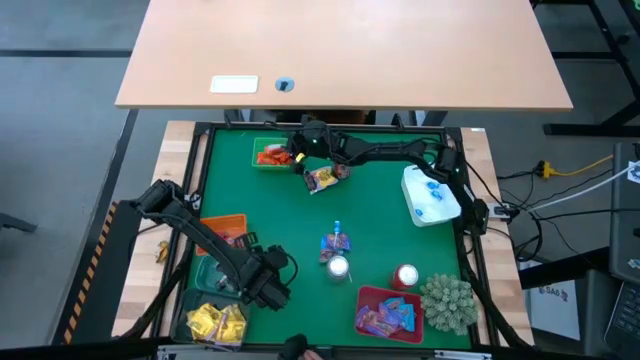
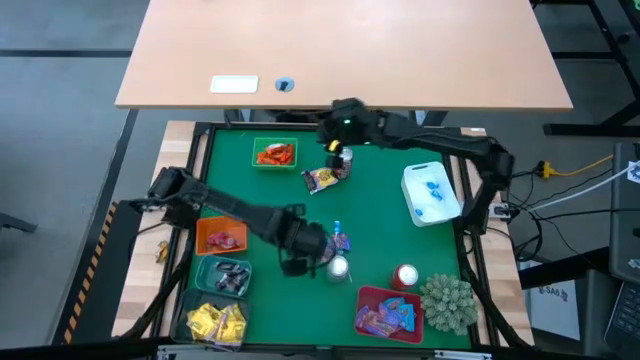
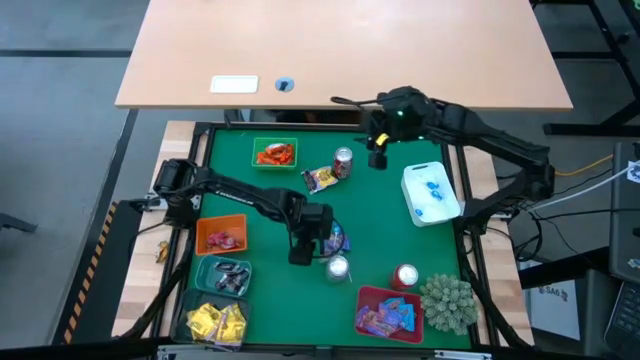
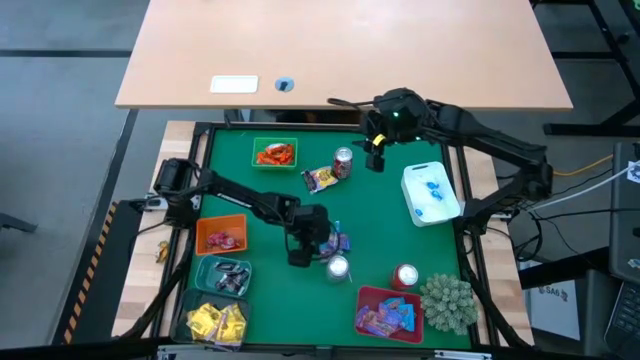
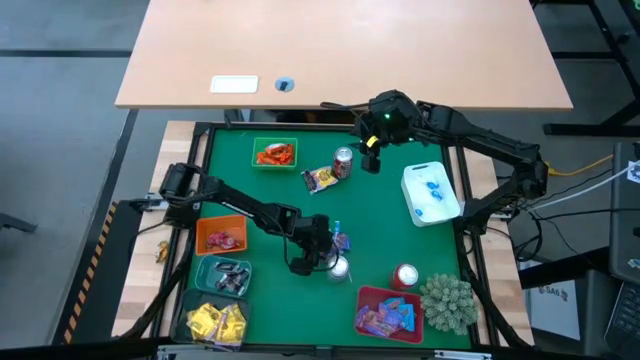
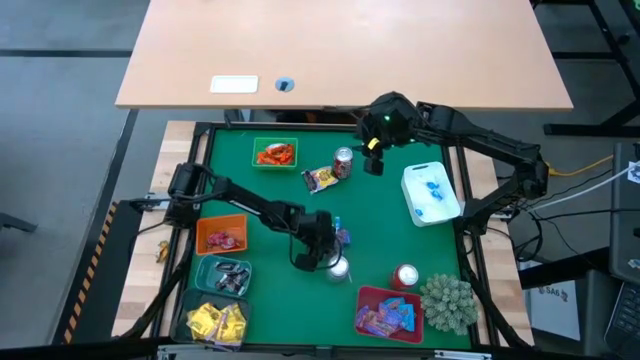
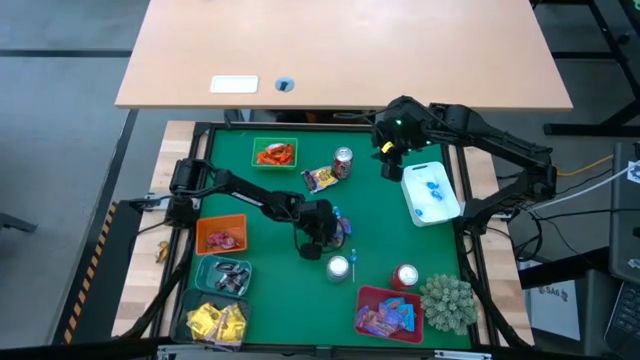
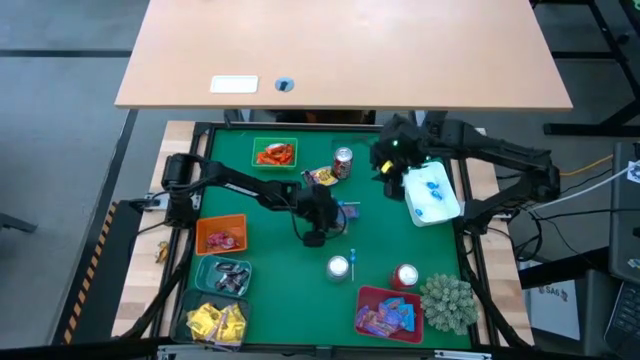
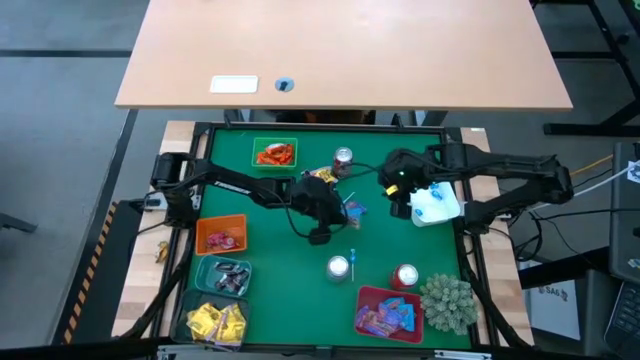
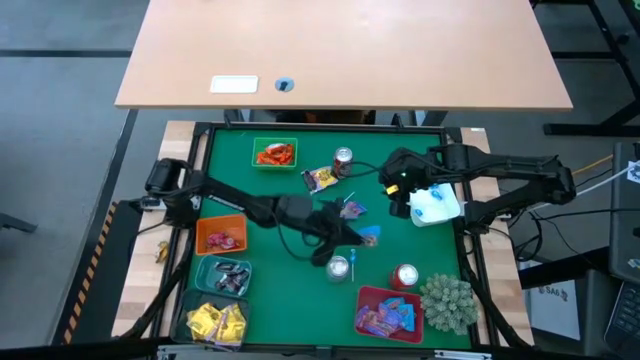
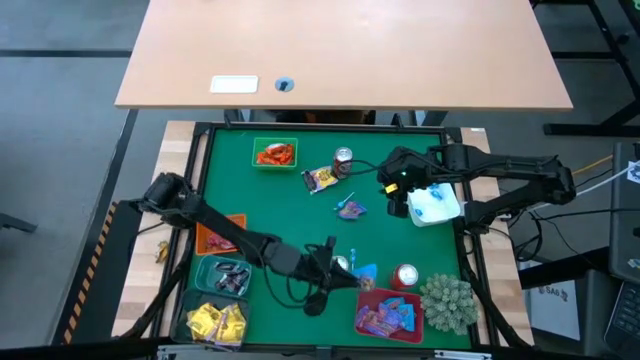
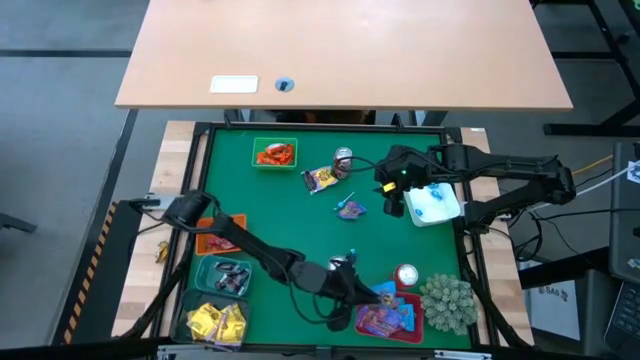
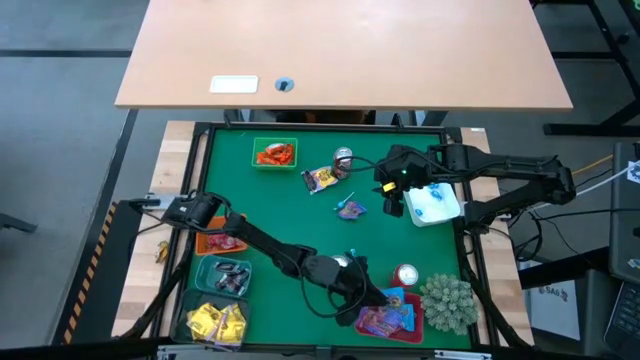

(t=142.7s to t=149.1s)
Task: Sort candy
Put the blue candy into the red bin

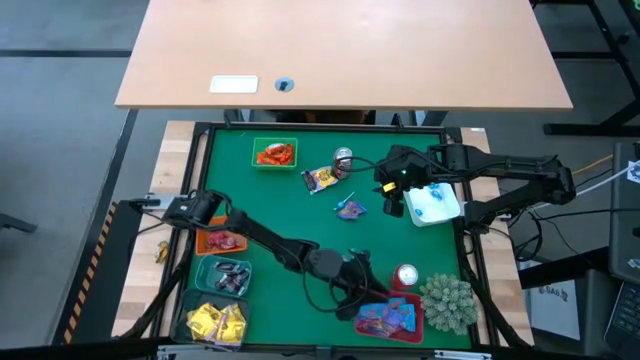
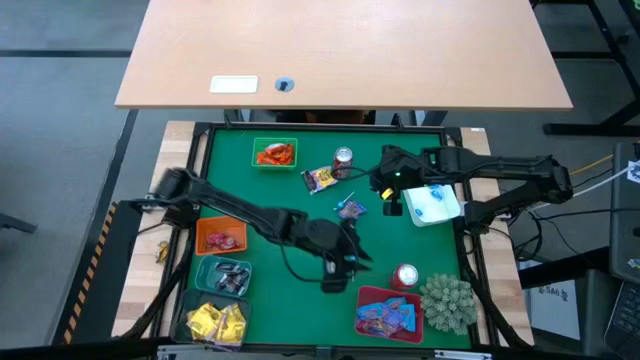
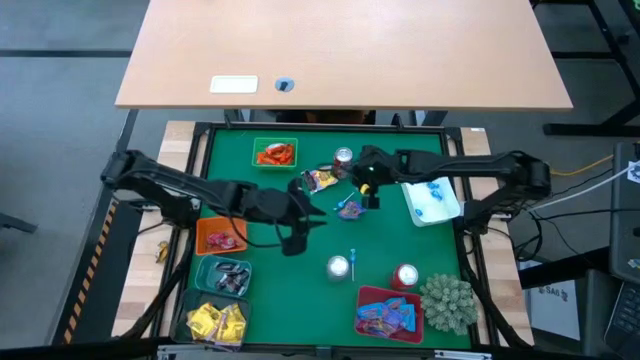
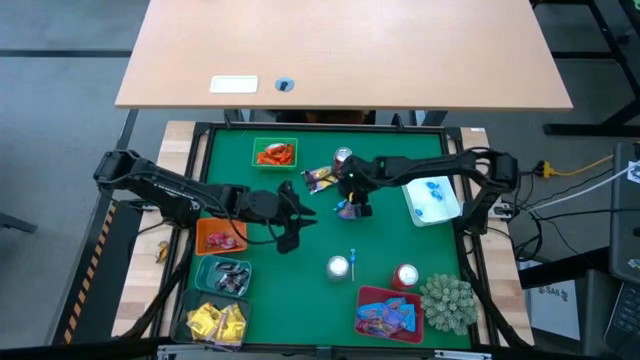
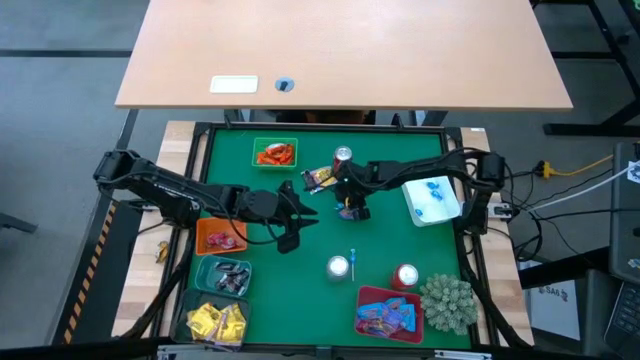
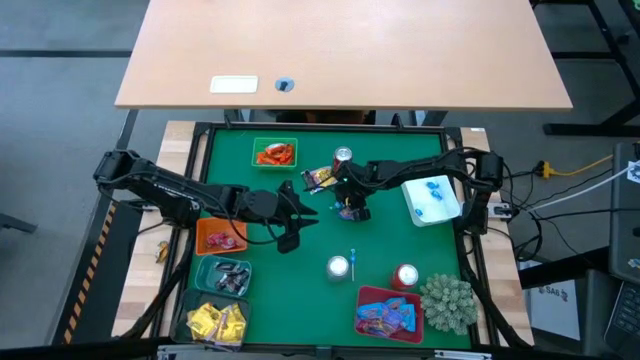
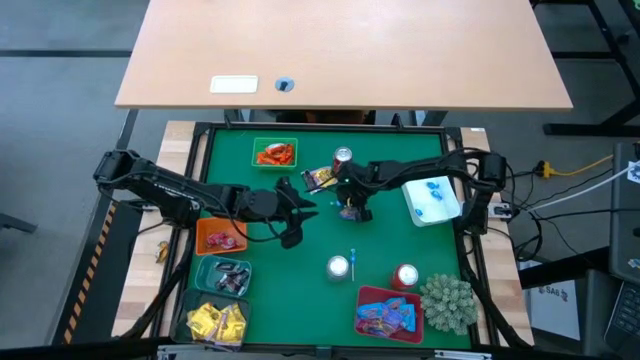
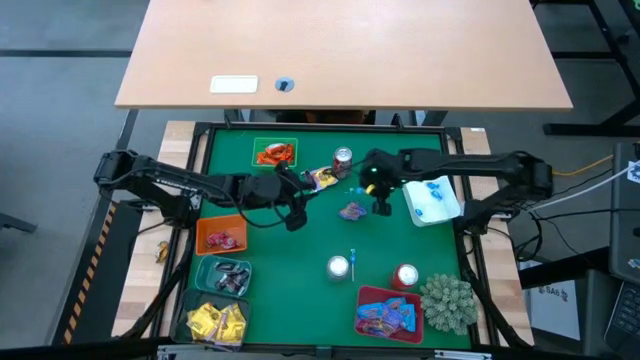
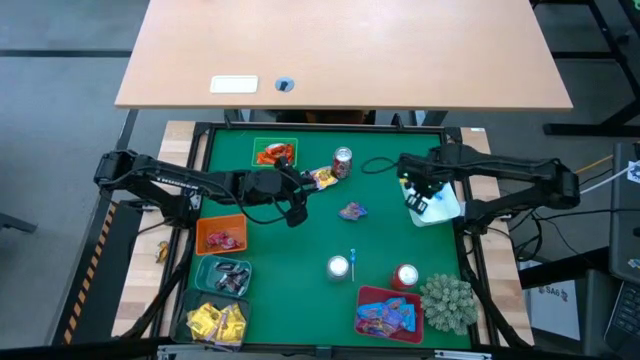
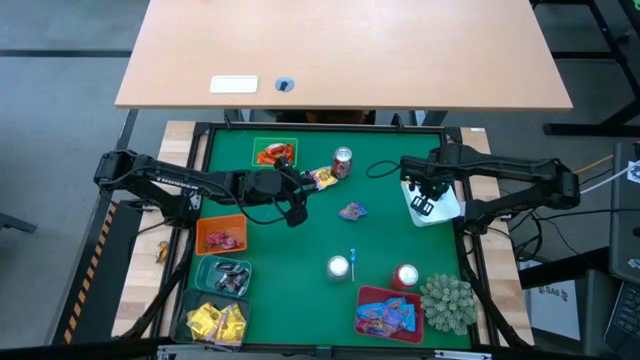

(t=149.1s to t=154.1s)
Put the blue lollipop candy into the white bin

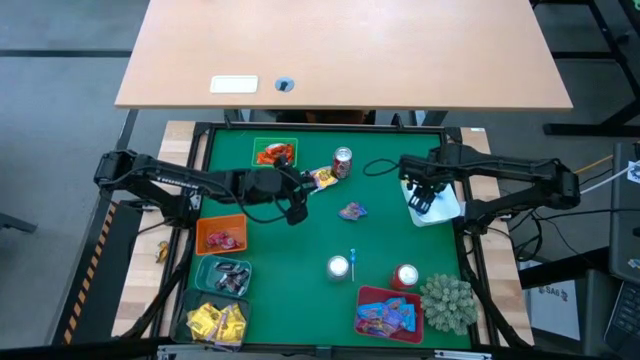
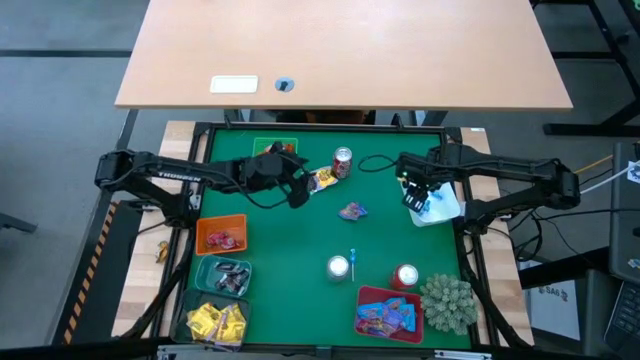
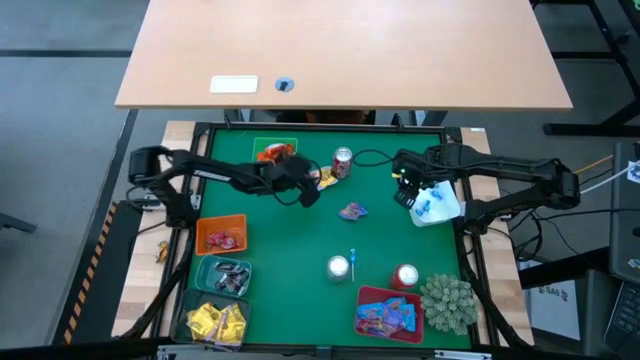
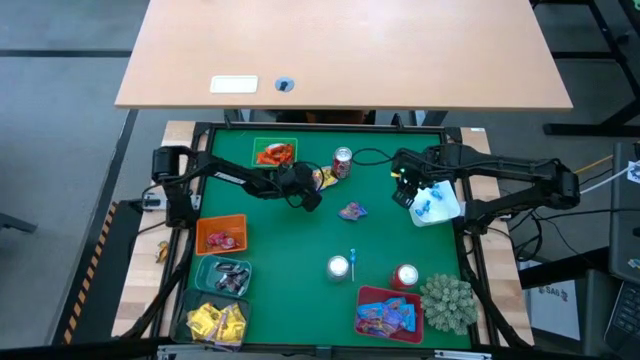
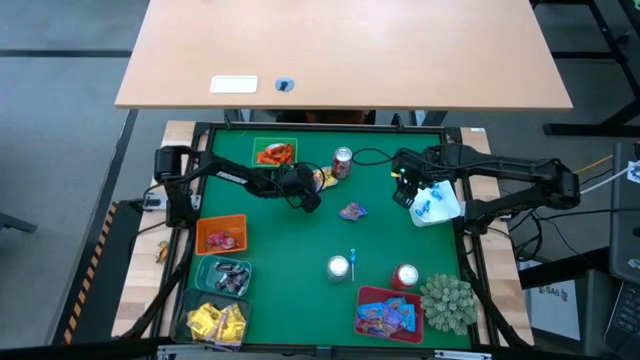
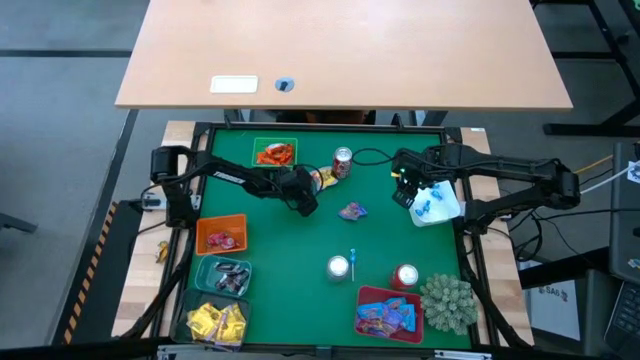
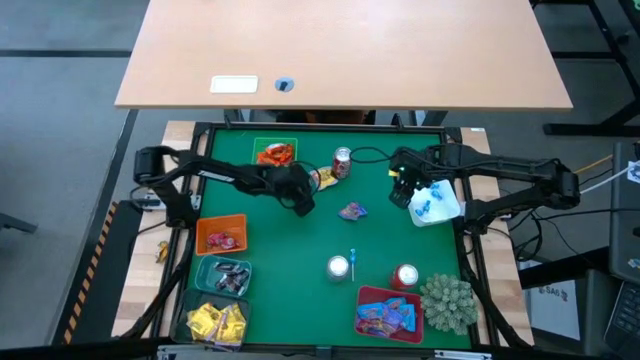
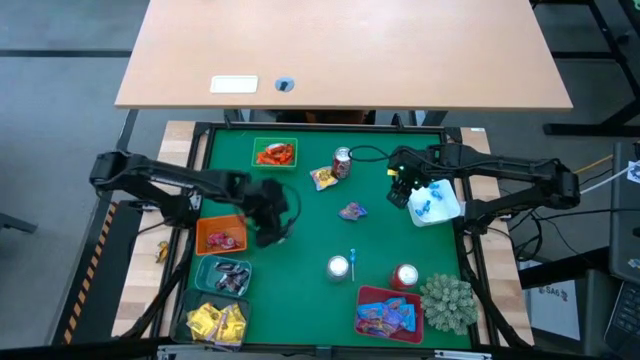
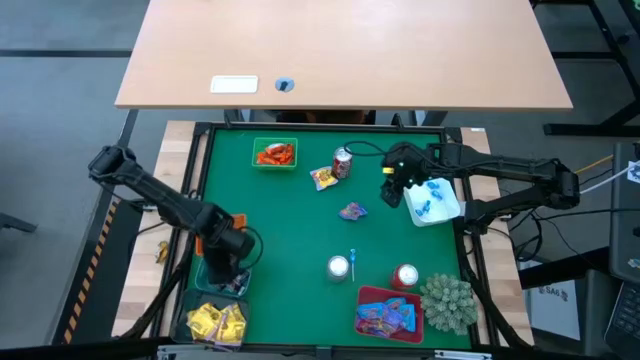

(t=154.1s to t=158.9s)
Put the brown chocolate into the blue bin

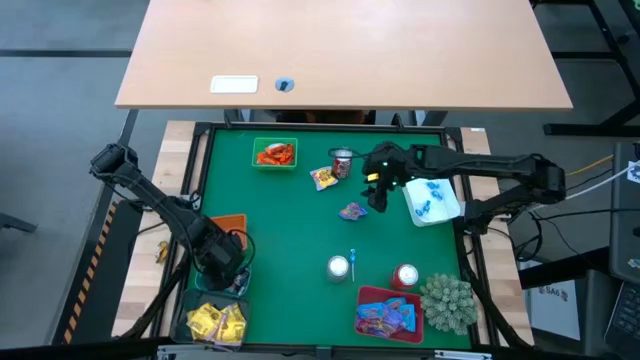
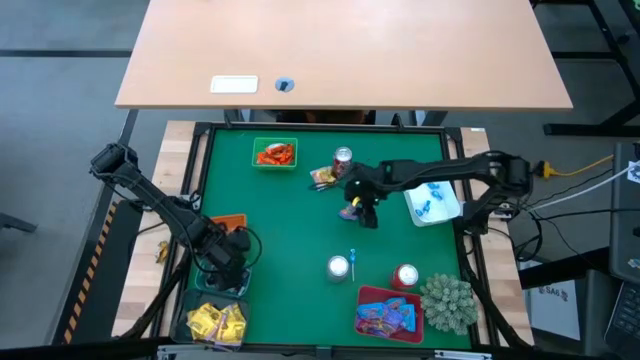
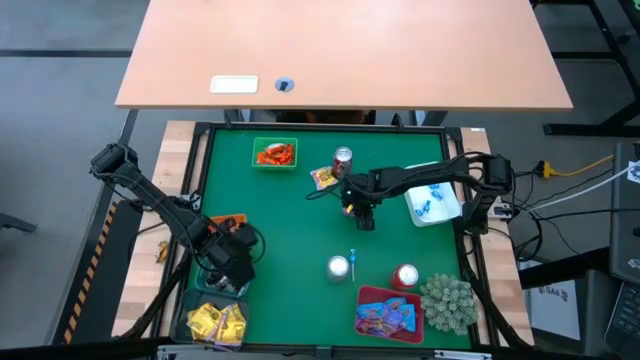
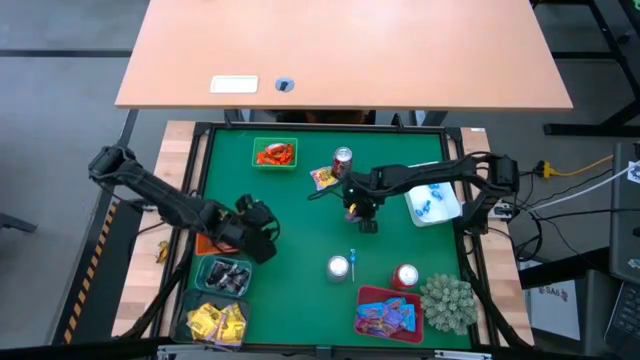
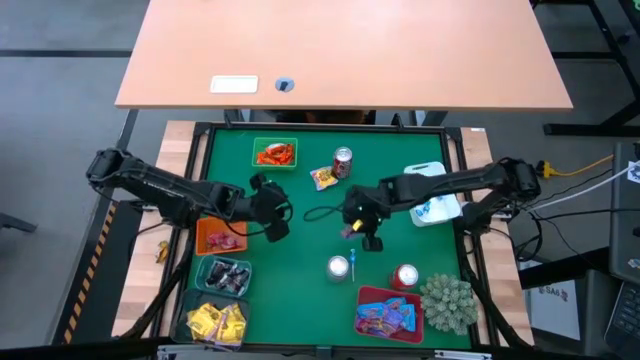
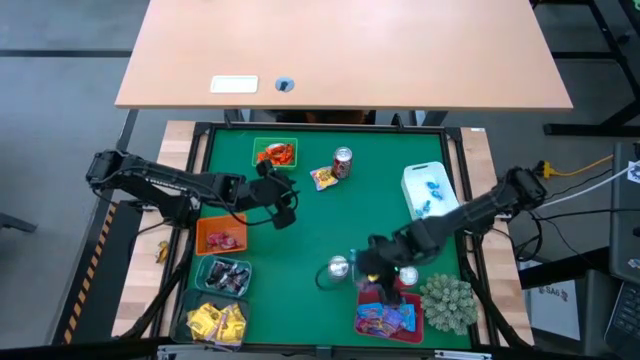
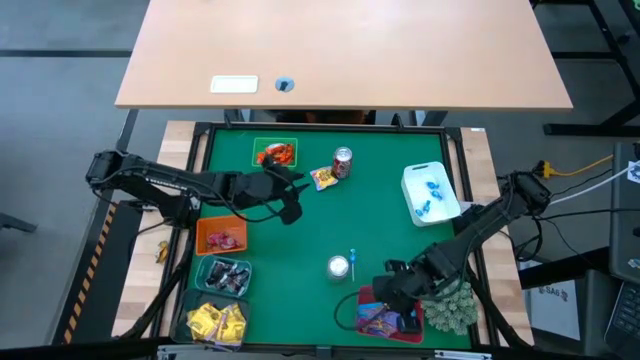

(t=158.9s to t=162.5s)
Put the purple candy into the red bin

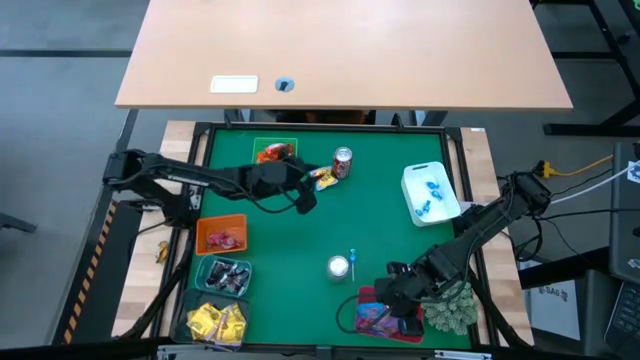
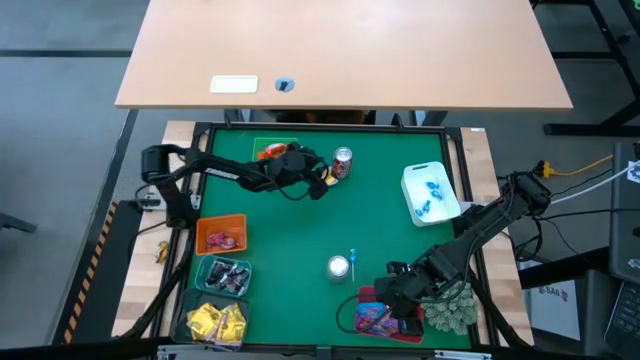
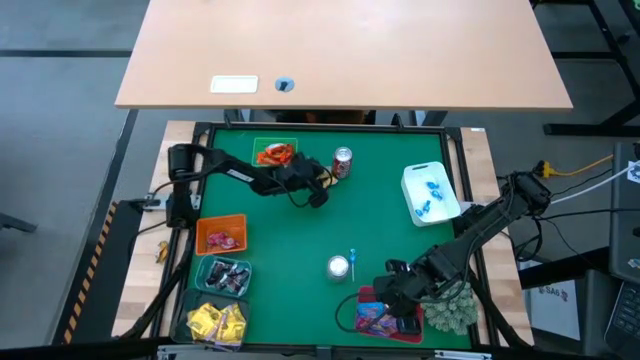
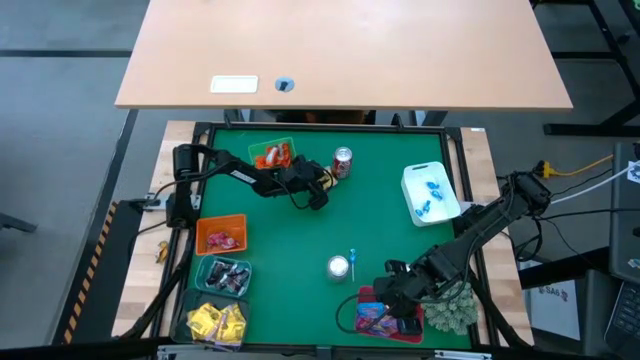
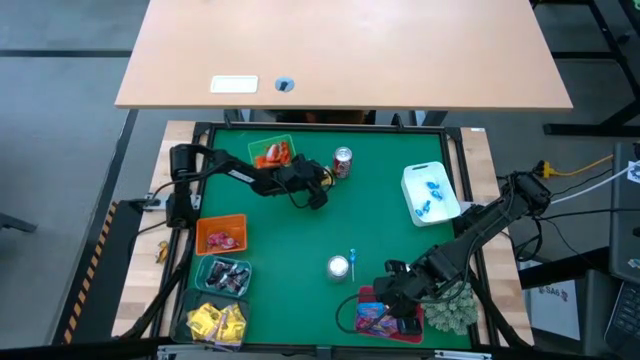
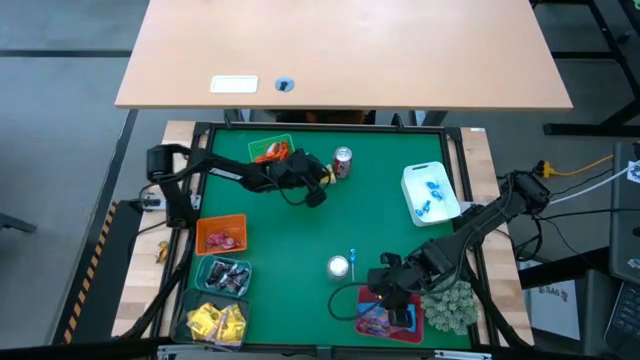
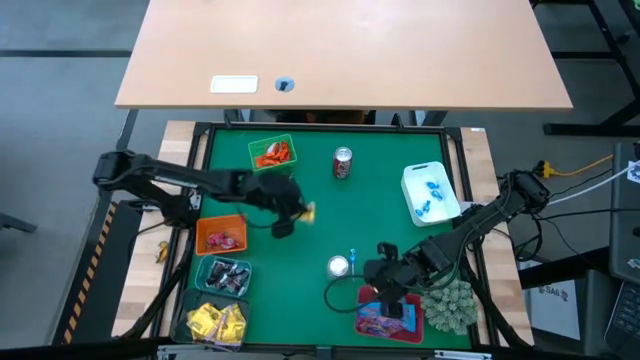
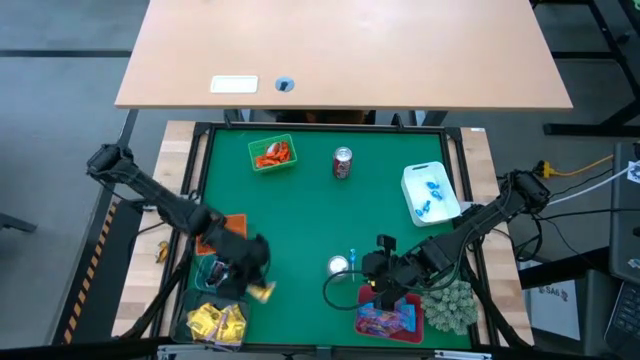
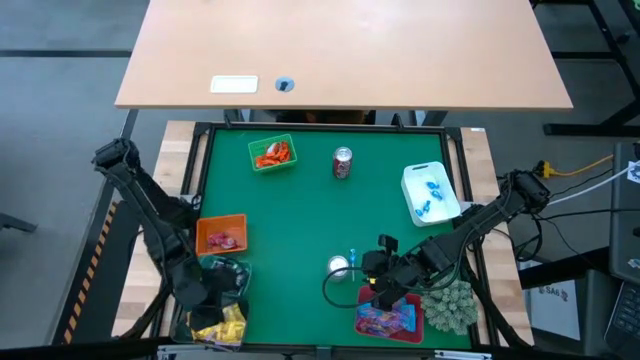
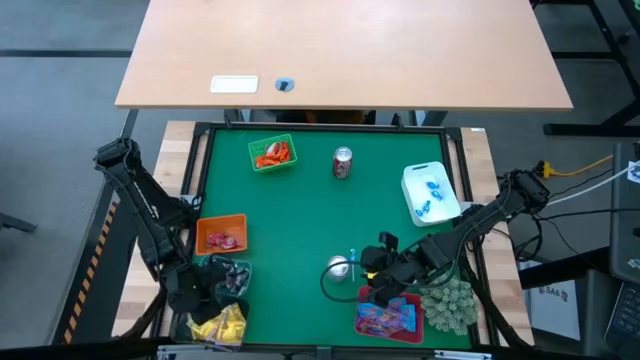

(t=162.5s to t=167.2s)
Put the yellow candy into the black bin
